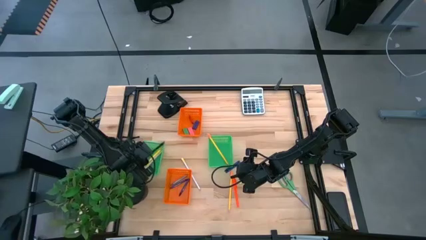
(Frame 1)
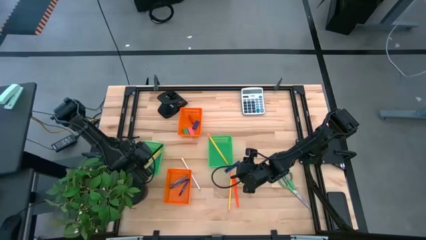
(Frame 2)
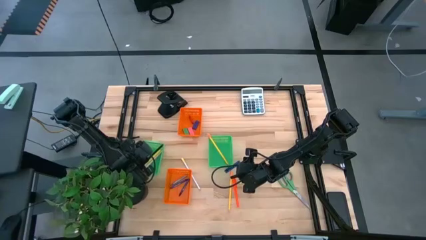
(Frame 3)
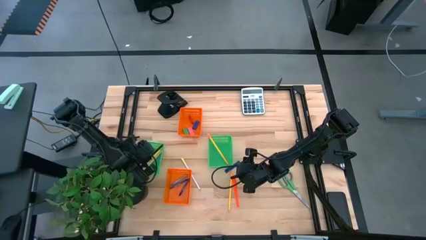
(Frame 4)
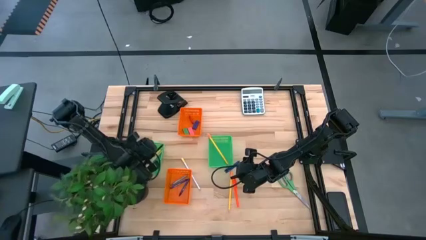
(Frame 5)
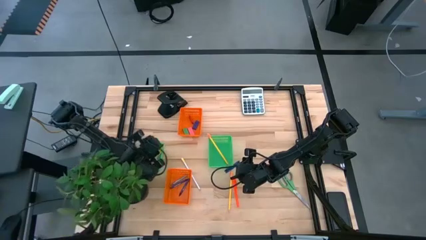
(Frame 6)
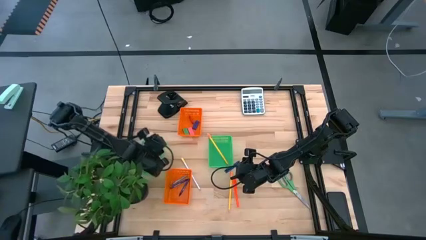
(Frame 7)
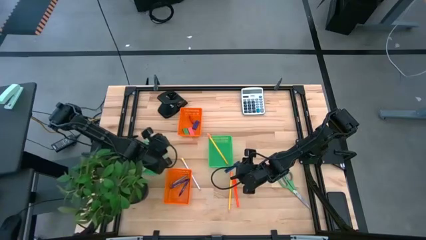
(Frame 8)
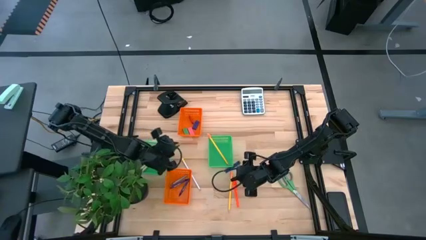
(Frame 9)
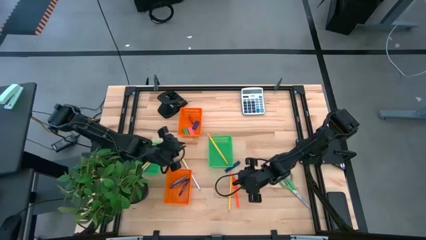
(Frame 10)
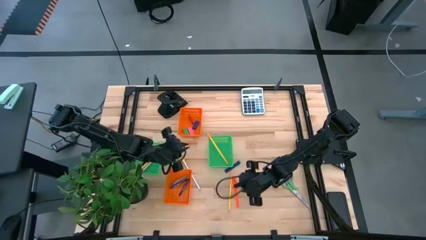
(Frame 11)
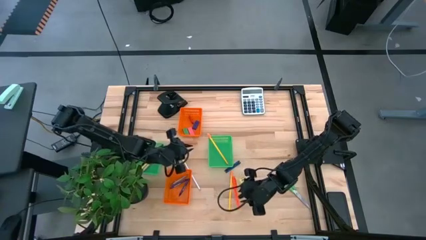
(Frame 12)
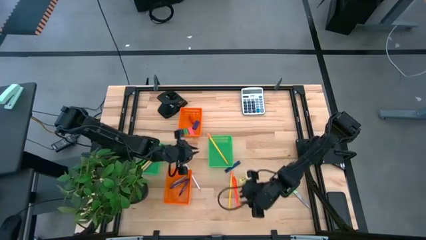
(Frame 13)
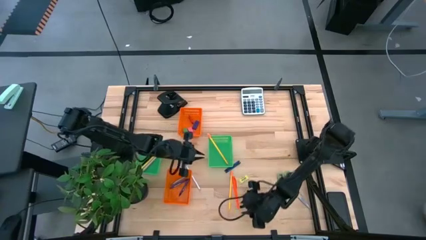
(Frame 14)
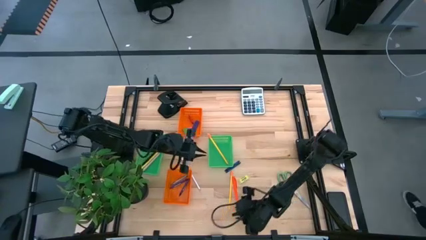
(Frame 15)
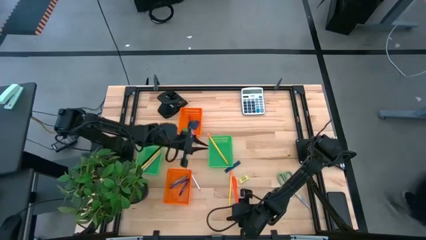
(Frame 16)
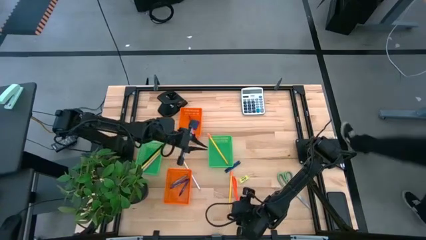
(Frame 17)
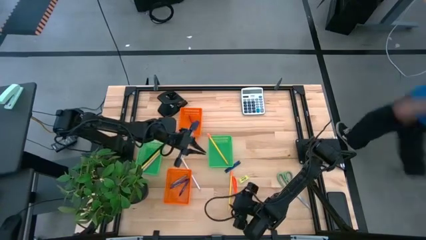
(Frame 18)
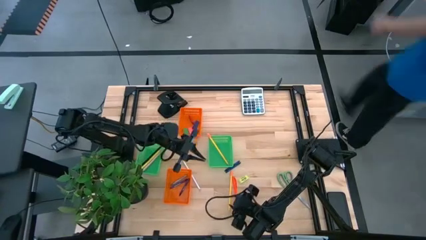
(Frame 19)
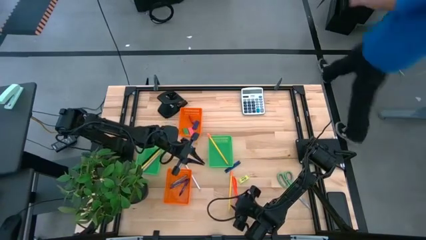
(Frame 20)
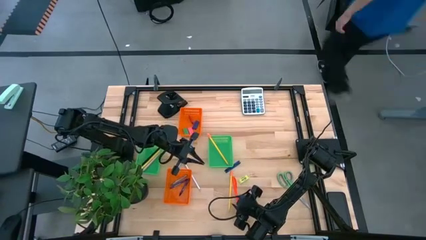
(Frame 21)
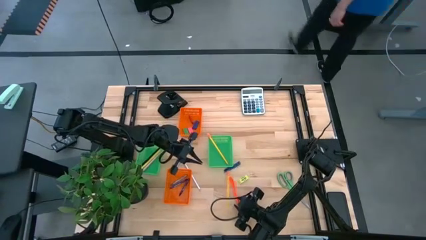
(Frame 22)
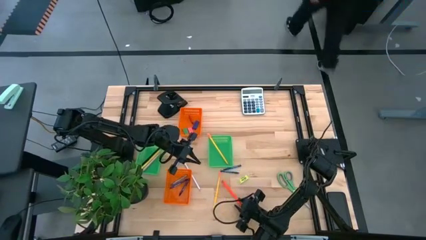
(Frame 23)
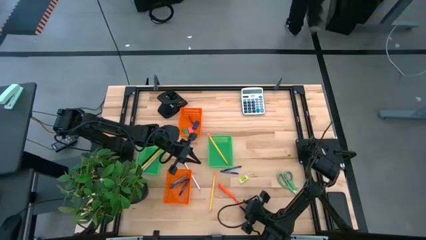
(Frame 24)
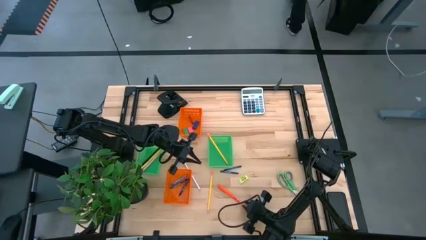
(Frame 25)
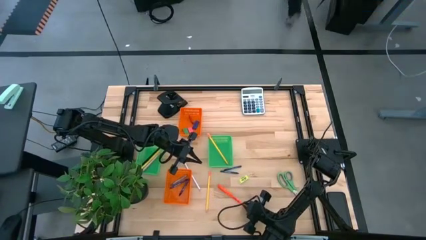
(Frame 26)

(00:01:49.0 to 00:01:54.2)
Task: Sort crayons/erasers/pens/pencils in bins
Put the orange pen into the left green basket

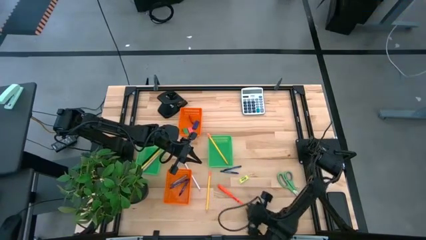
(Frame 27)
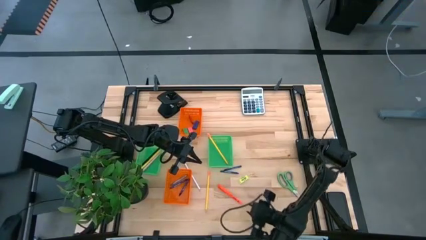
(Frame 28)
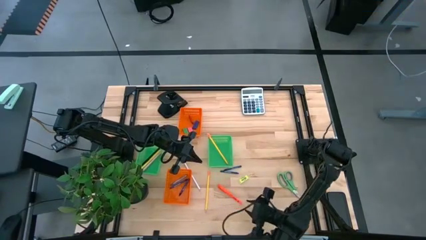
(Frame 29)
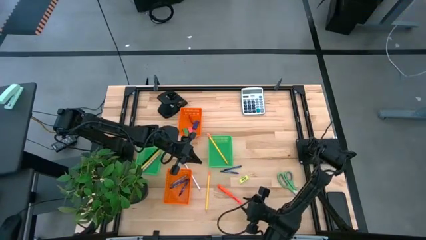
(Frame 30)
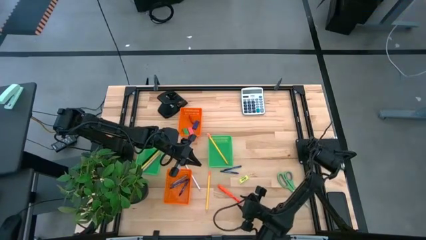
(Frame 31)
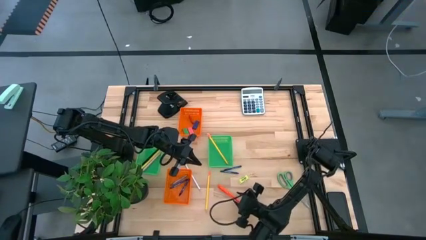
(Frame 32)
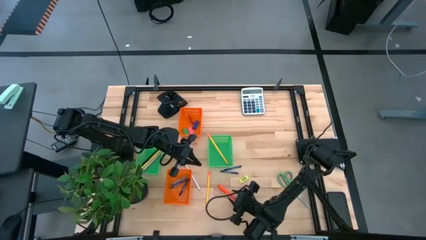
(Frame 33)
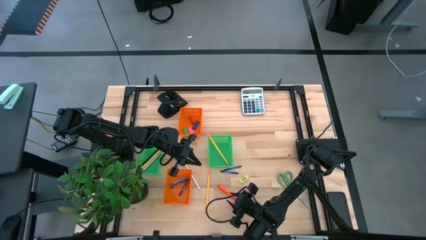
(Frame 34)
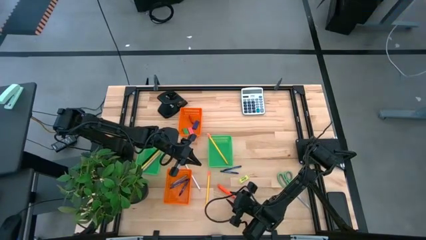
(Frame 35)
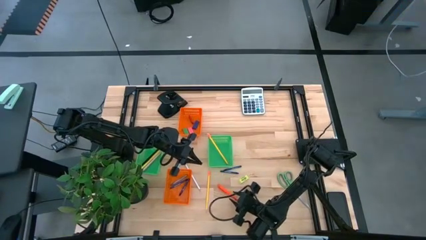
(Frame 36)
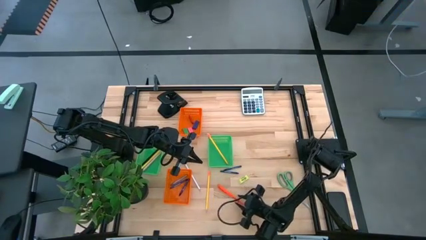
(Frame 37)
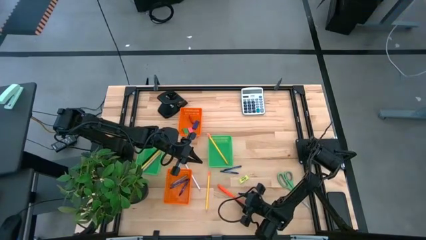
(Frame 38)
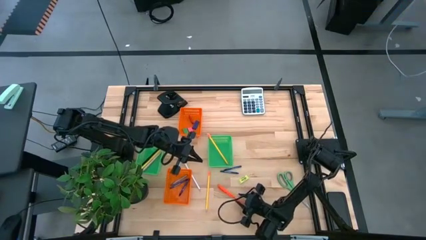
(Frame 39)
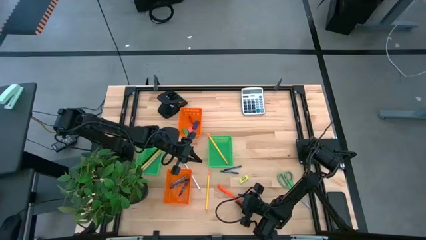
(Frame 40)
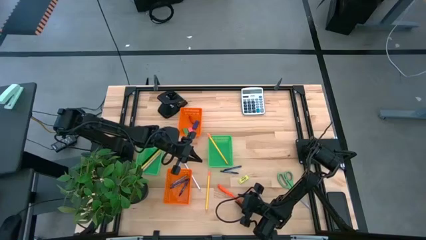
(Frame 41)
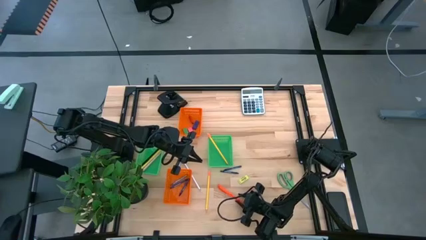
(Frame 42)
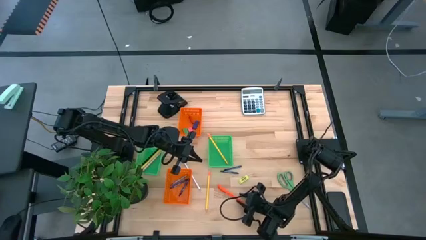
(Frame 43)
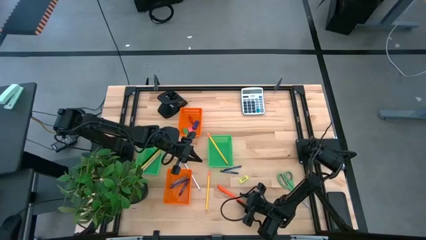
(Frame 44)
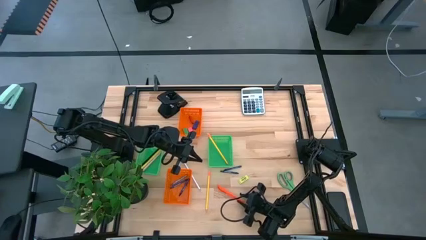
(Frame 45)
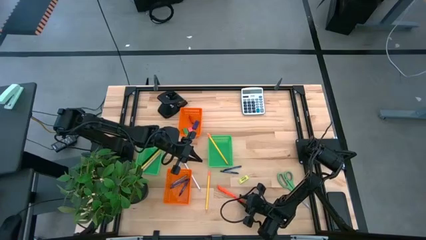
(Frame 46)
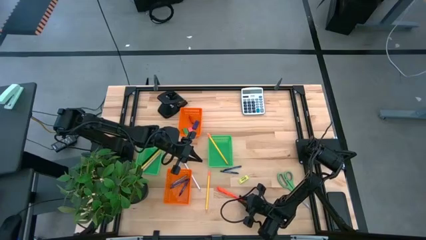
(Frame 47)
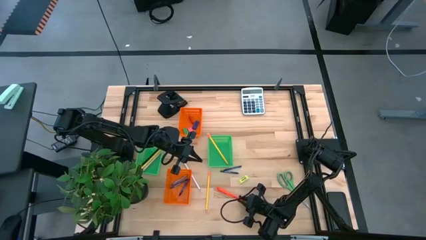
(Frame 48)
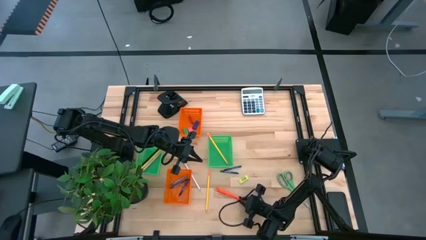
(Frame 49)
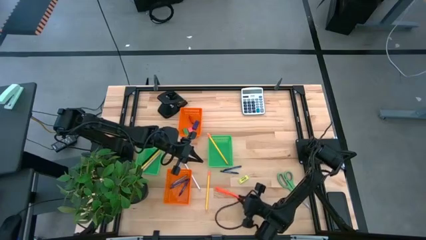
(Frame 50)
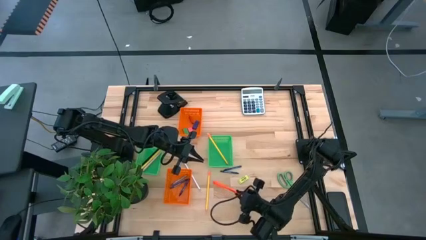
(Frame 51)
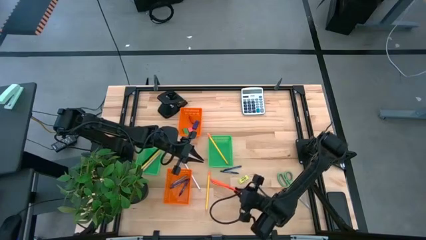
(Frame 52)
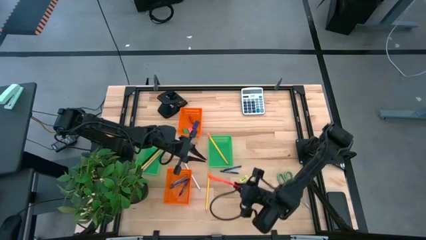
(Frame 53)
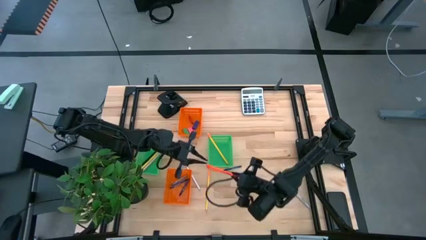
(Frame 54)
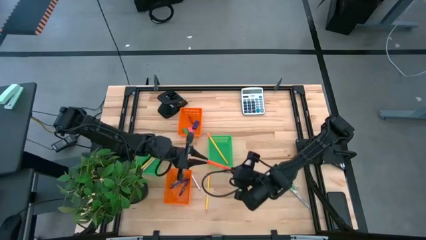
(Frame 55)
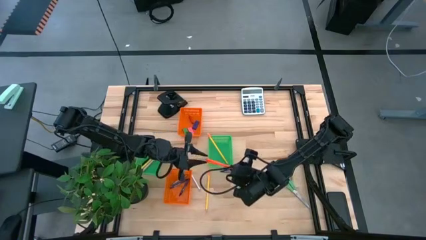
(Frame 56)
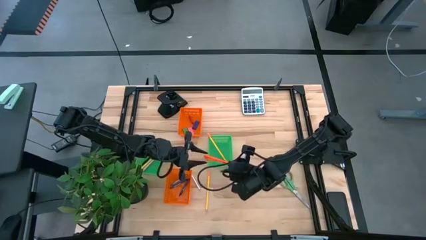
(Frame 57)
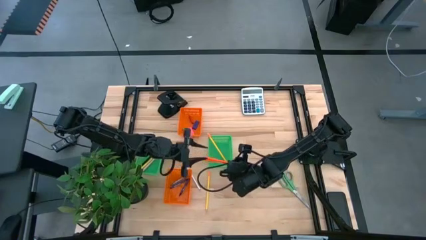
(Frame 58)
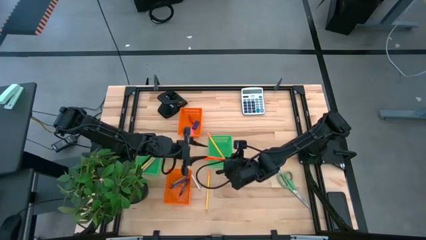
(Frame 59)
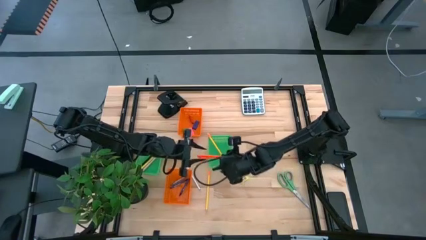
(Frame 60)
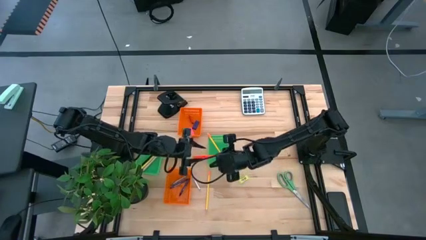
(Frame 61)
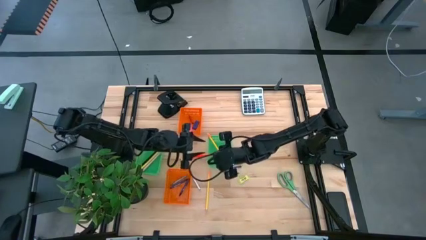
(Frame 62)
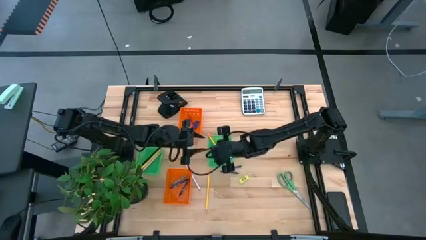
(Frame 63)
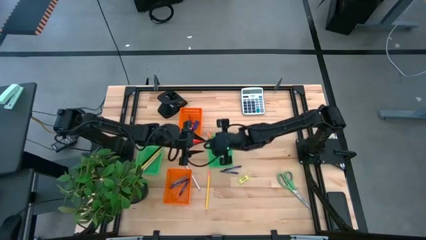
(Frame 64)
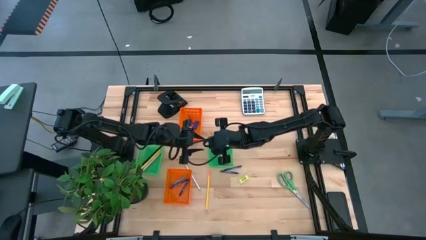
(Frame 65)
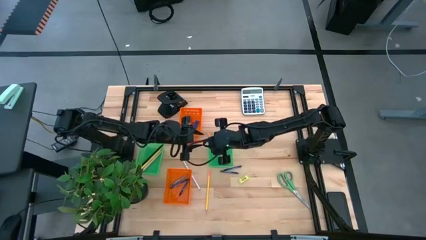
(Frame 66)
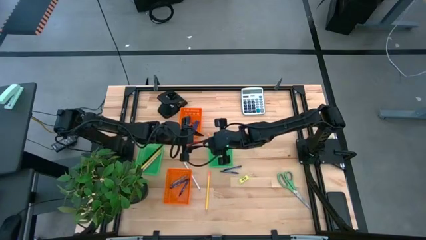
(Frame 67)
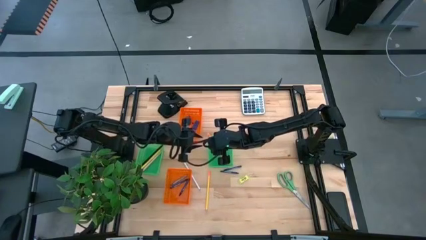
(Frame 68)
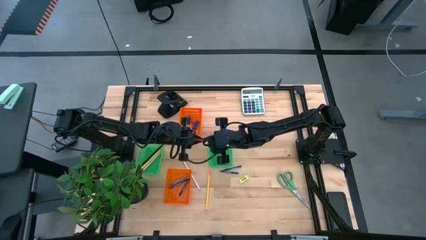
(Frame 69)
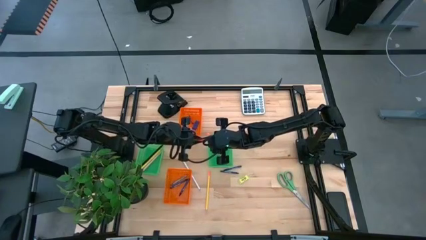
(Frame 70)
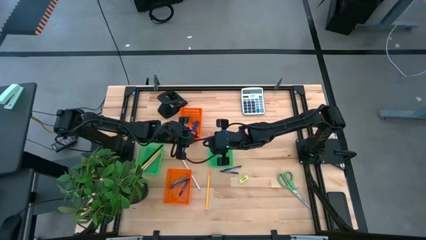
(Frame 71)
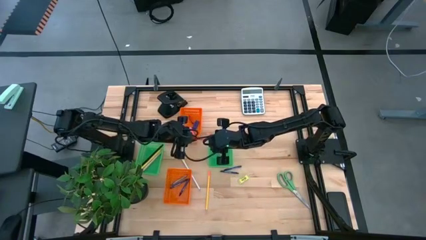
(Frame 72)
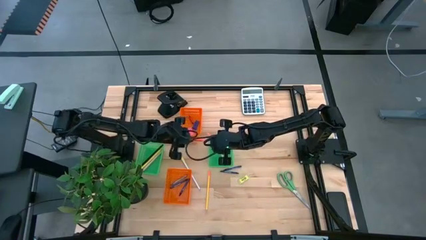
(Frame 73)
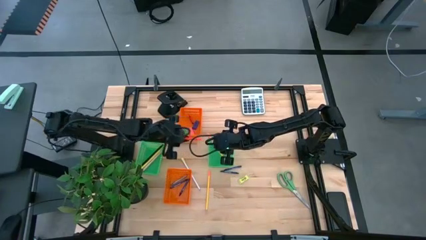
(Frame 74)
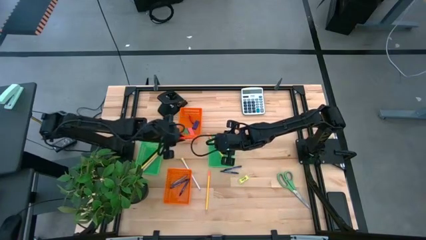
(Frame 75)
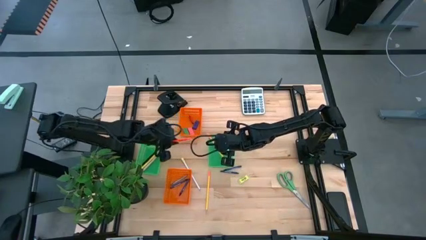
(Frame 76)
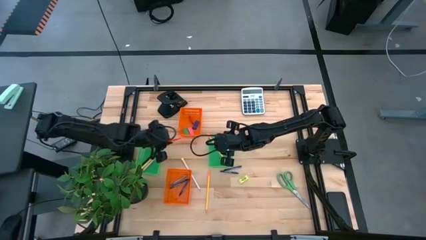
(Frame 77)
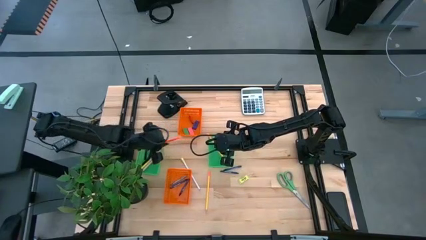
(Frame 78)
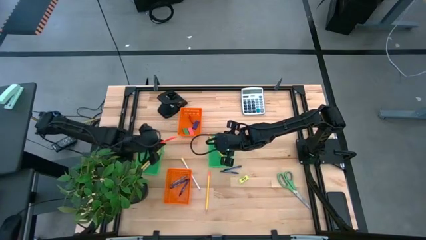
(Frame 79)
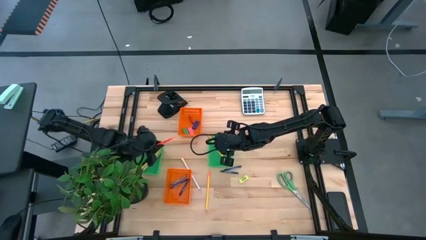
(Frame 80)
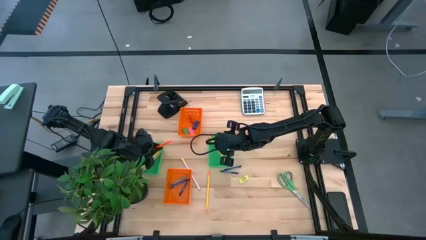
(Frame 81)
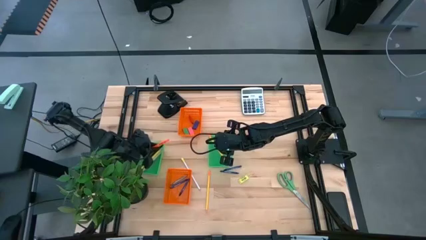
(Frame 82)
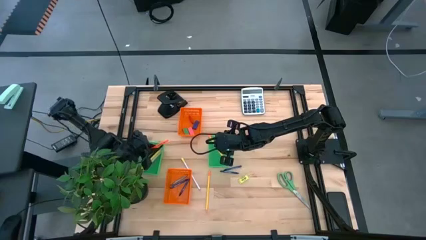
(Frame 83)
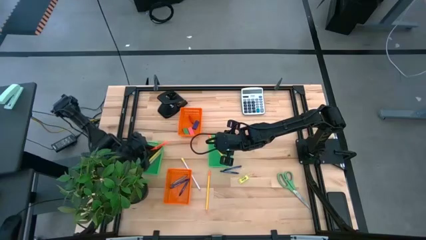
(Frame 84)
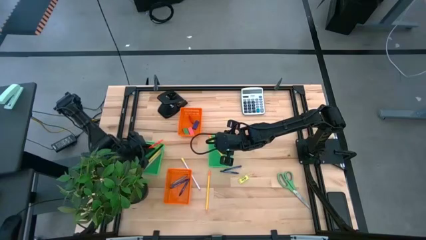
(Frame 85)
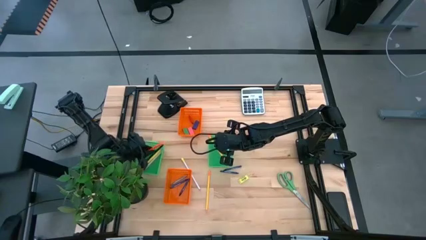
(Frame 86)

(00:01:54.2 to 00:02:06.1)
Put the orange pen into the left green basket
